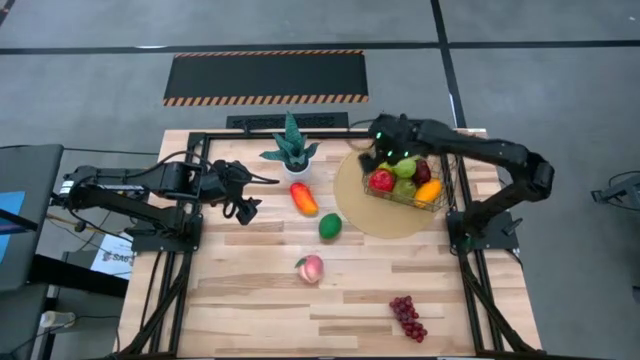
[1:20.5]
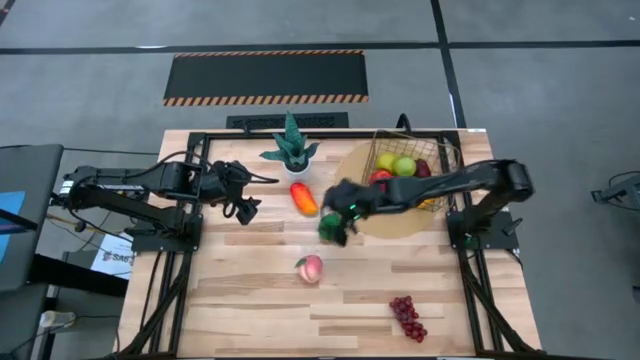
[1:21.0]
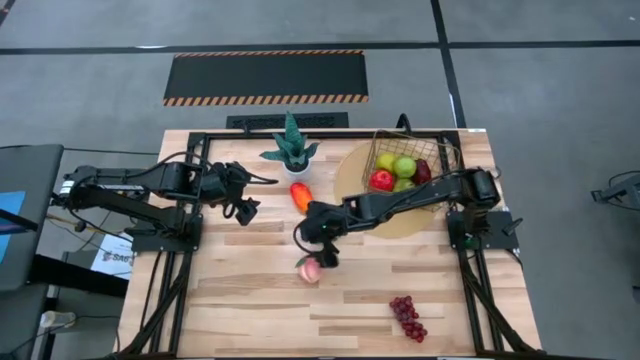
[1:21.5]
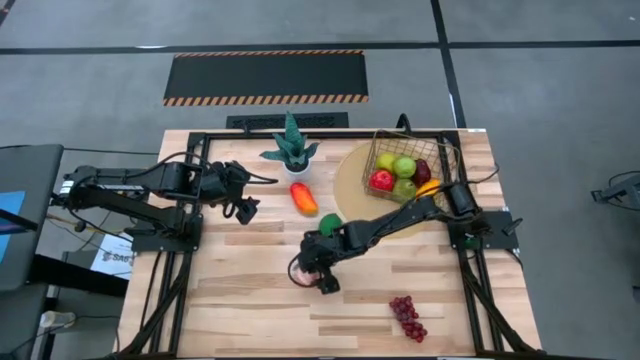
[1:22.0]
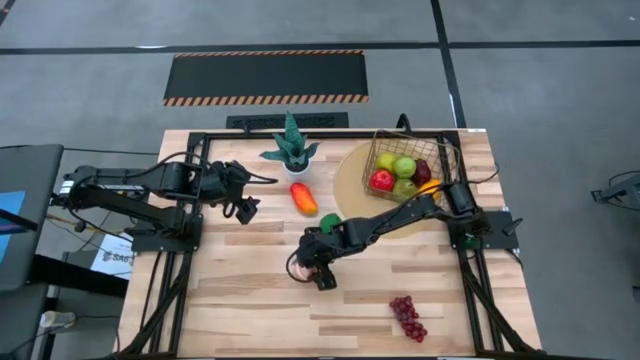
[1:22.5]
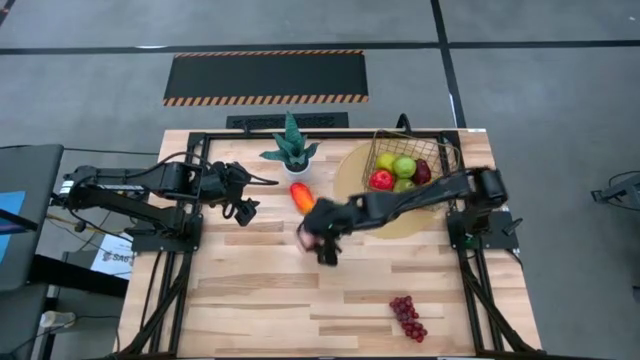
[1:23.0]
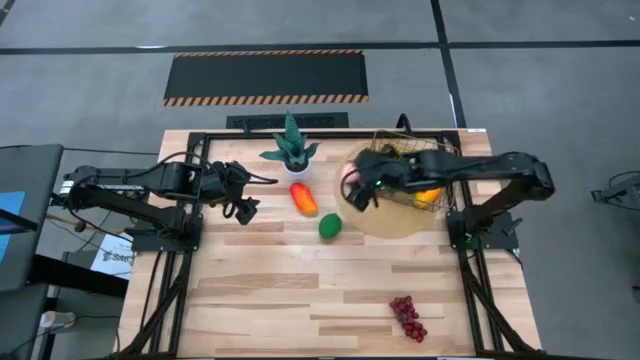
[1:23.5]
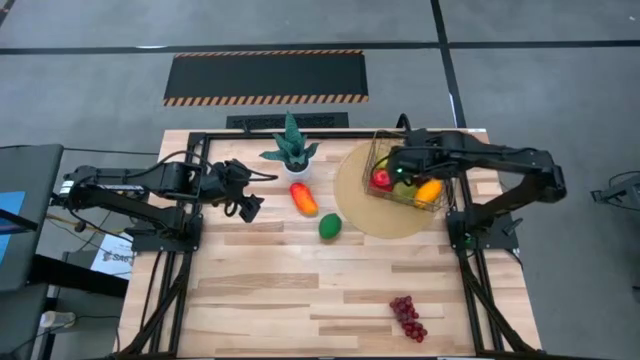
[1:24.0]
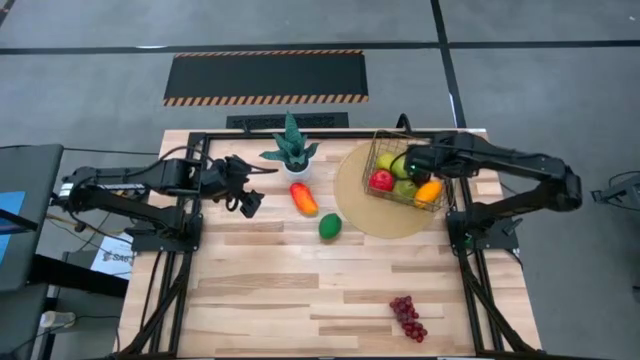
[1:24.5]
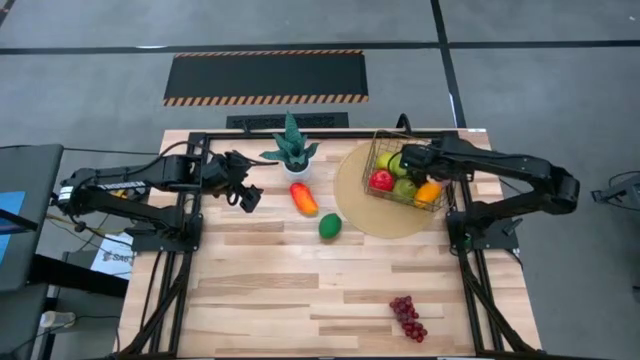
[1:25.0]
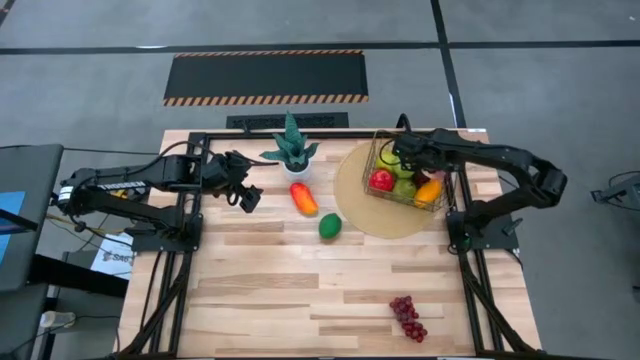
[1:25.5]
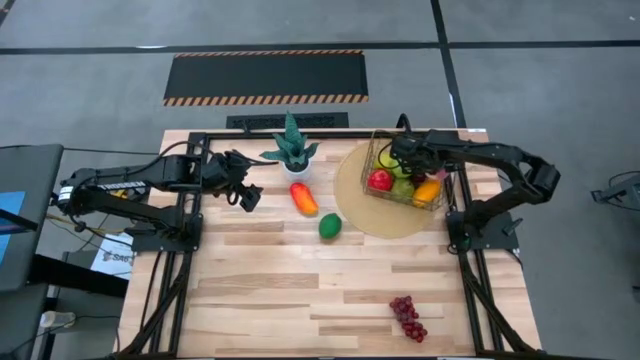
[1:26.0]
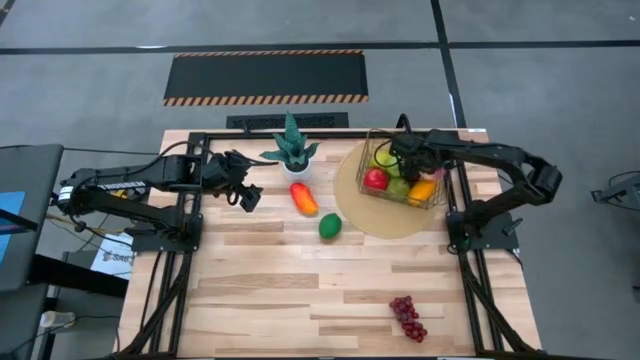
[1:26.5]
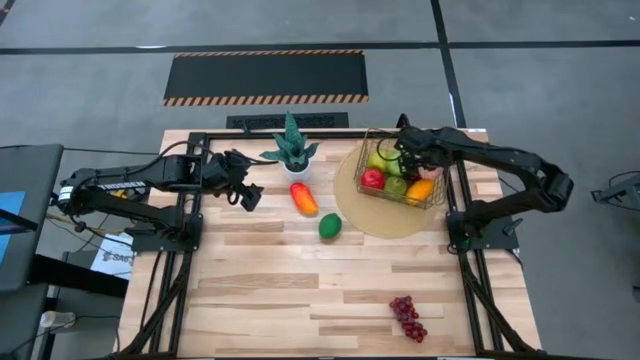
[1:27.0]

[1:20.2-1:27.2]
Task: Build produce basket
Put the peach into the wire basket

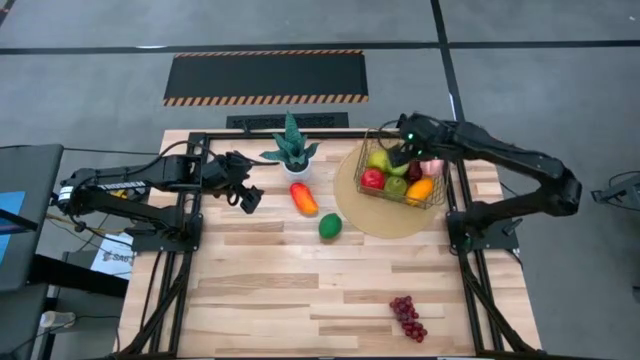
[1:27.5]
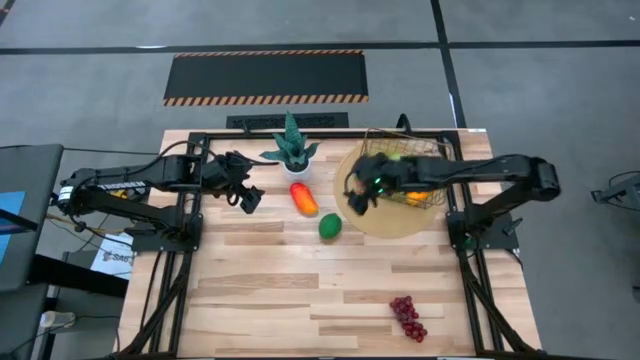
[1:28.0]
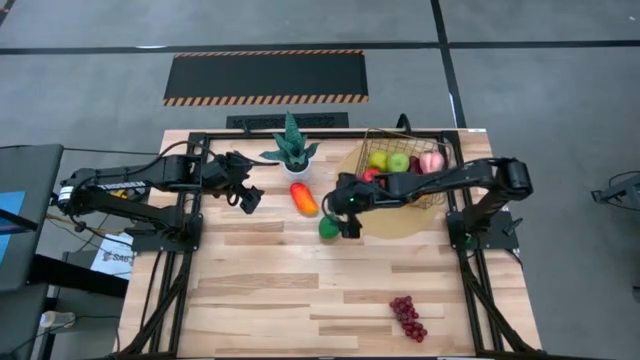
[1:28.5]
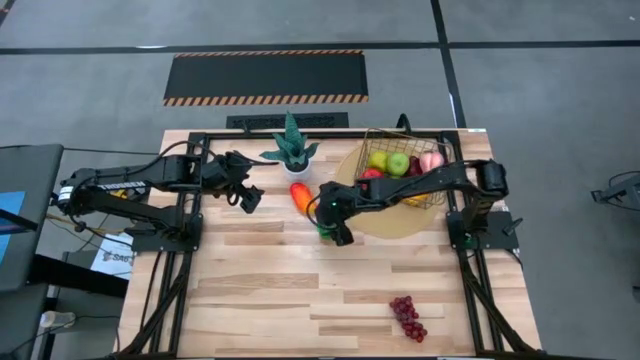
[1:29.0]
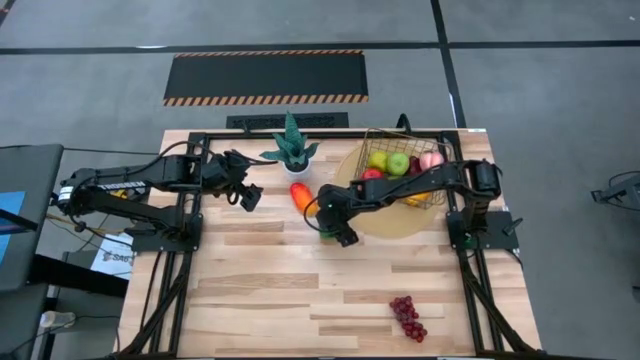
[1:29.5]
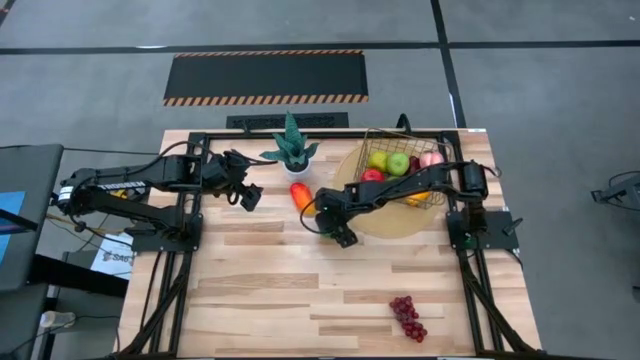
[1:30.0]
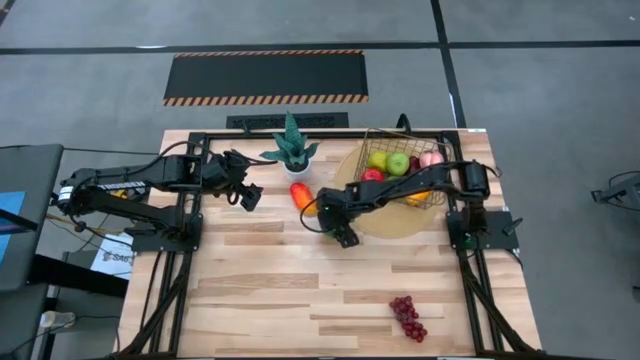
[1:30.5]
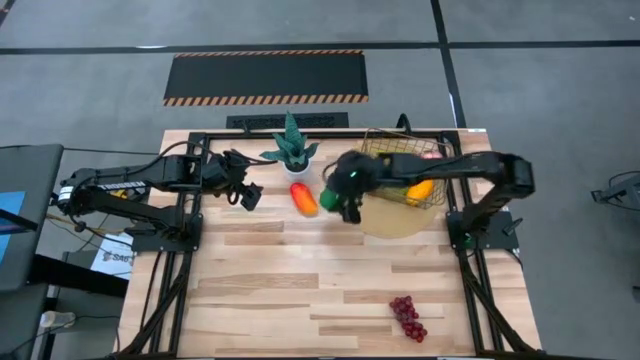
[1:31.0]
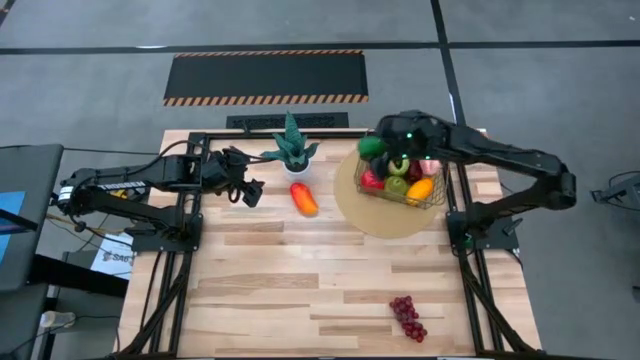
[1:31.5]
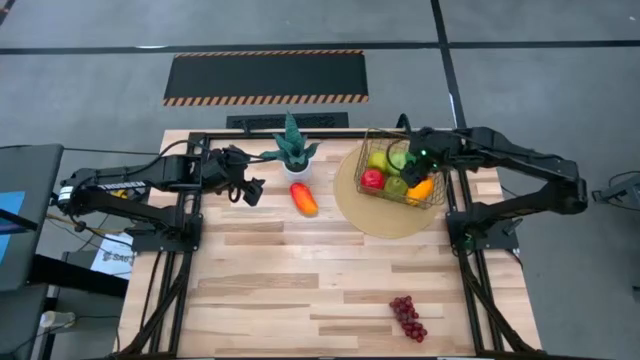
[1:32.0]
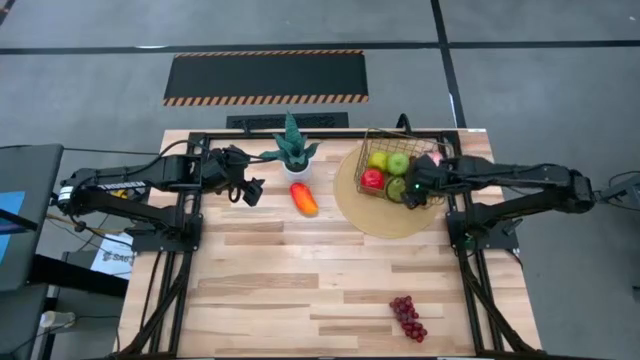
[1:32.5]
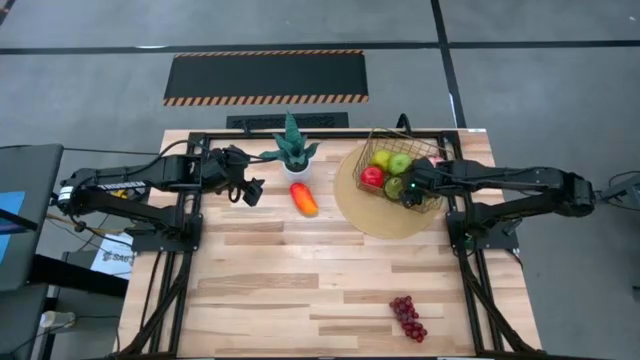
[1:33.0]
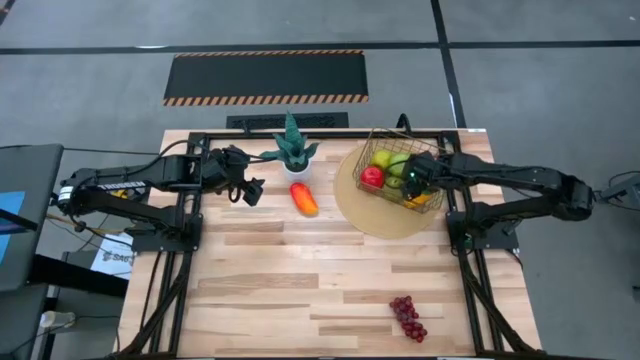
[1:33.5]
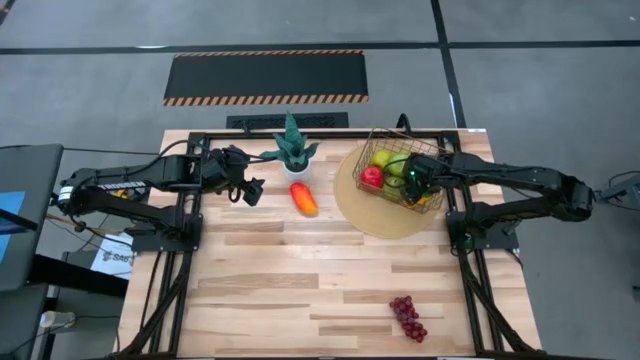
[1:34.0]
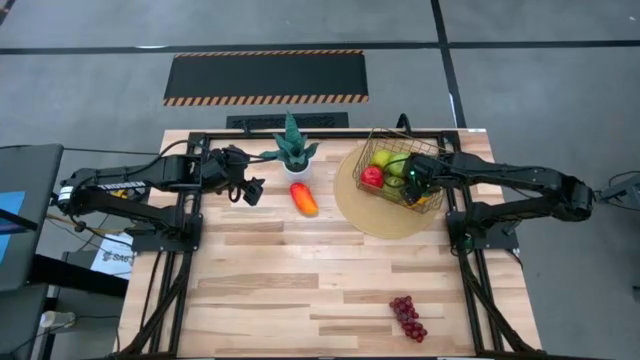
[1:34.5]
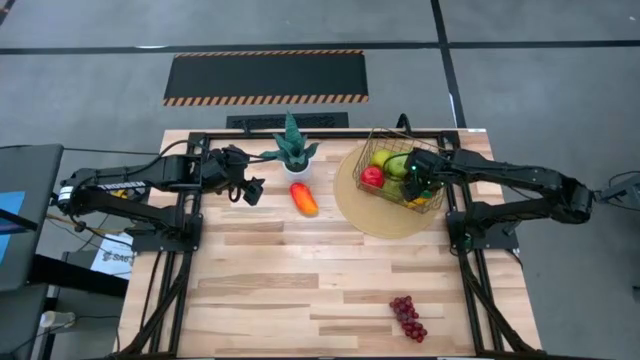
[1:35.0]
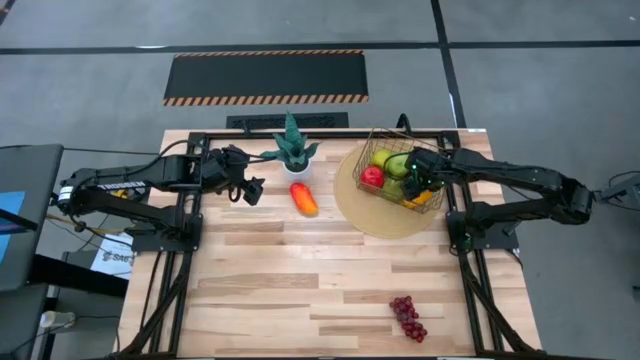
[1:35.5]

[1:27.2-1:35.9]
Put the lime into the wire basket

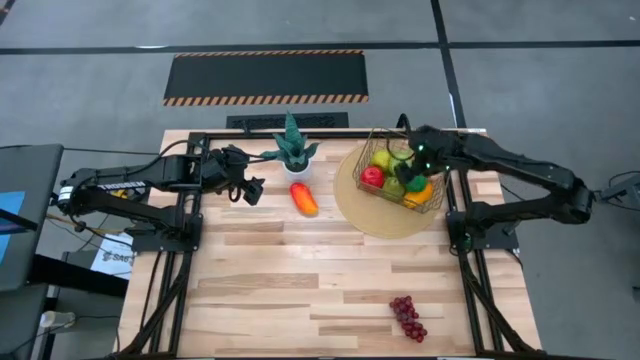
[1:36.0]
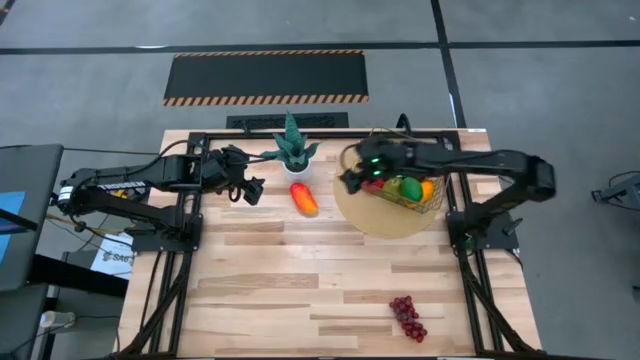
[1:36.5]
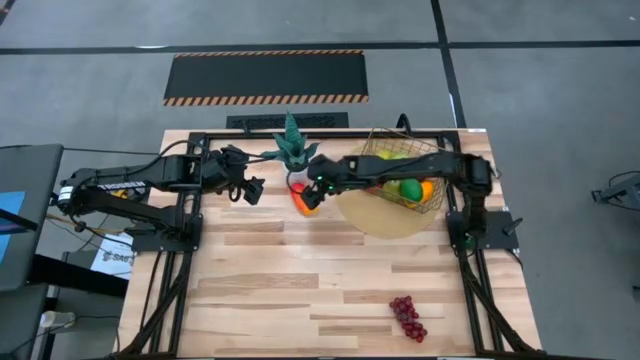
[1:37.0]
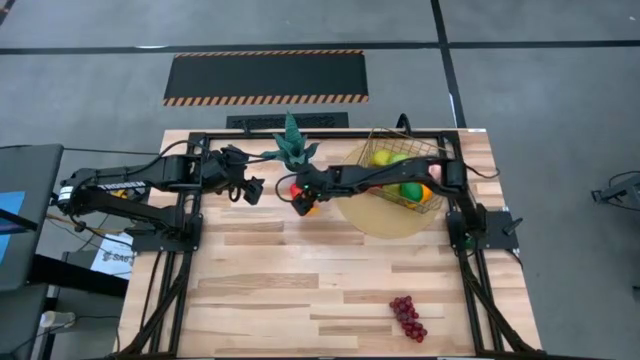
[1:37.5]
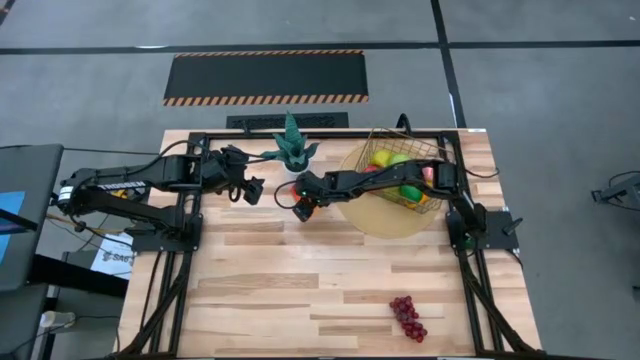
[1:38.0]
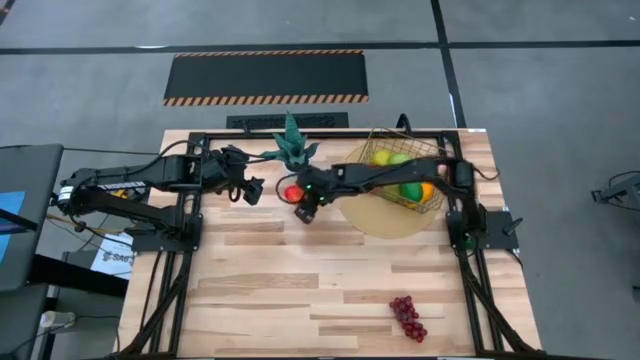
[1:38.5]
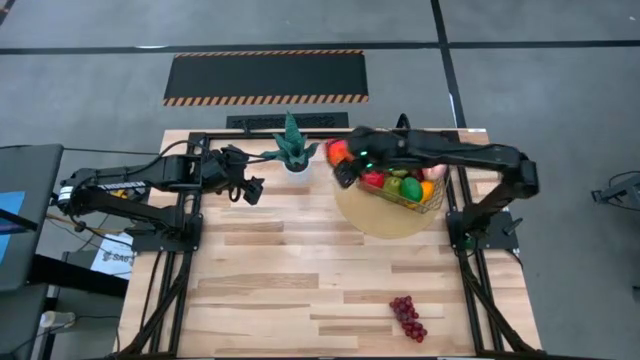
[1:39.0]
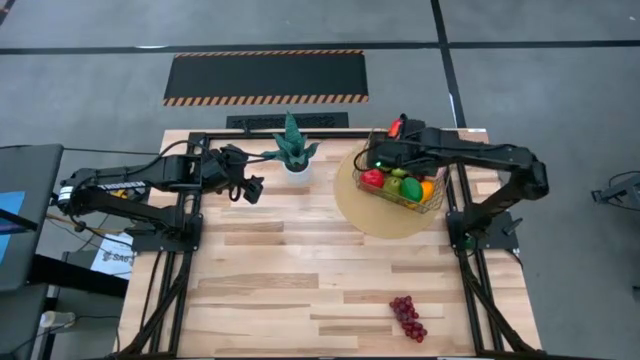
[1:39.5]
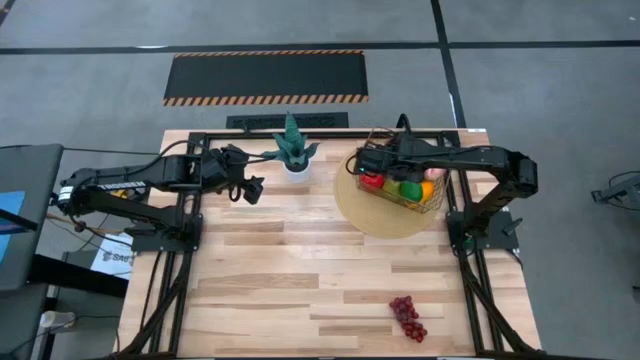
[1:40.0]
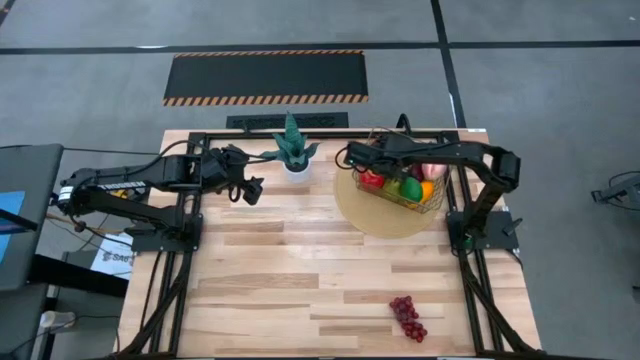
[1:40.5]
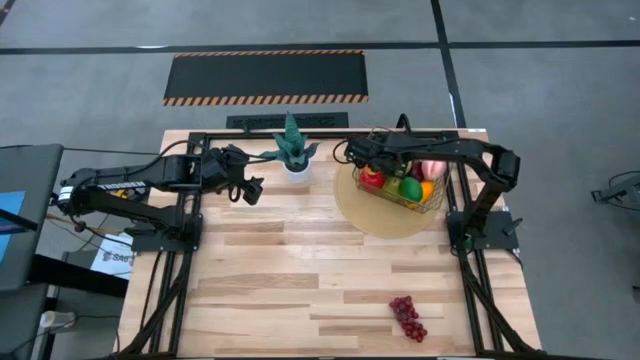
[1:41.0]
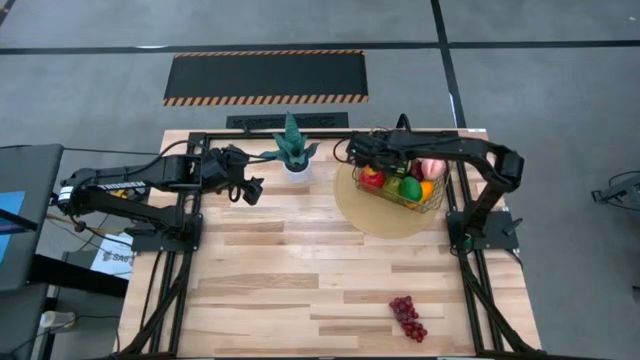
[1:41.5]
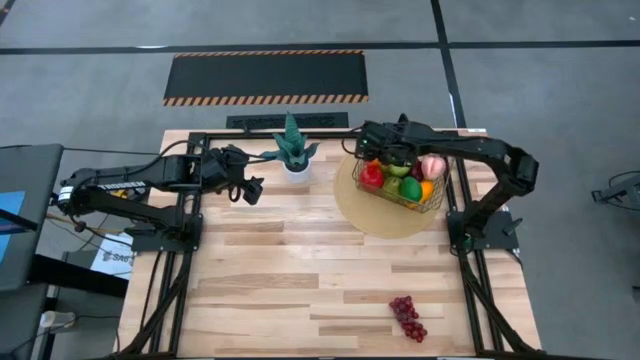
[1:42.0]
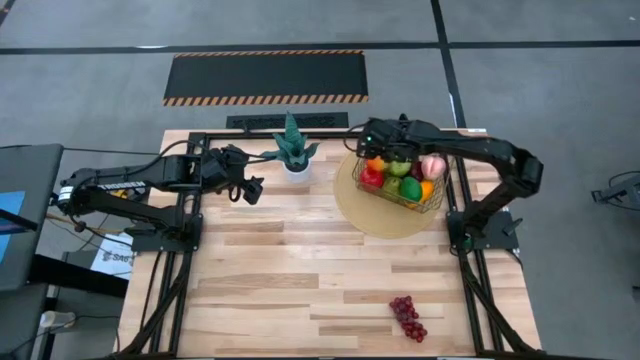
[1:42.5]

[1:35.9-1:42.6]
Put the orange mango into the wire basket
